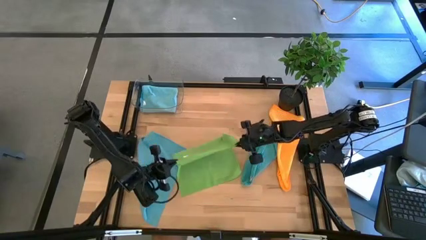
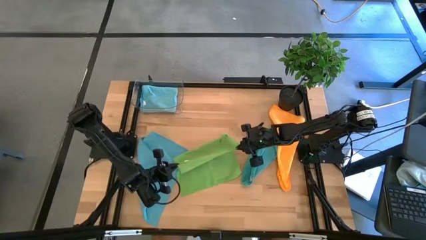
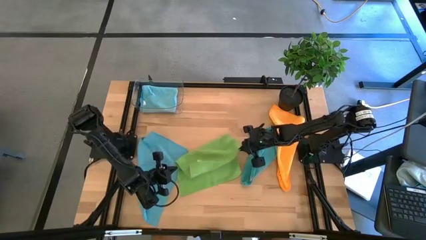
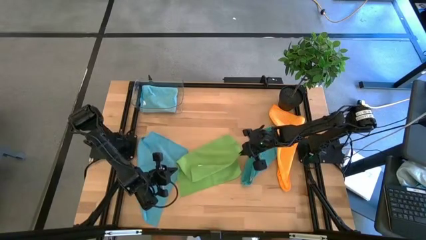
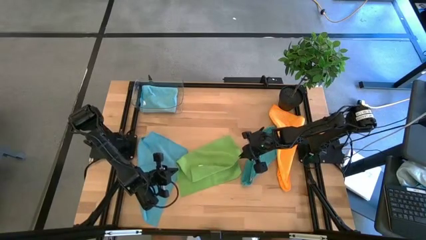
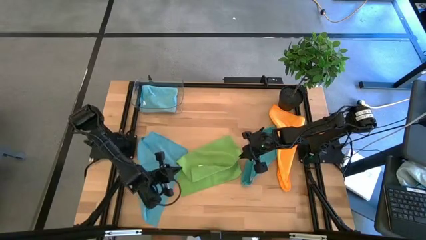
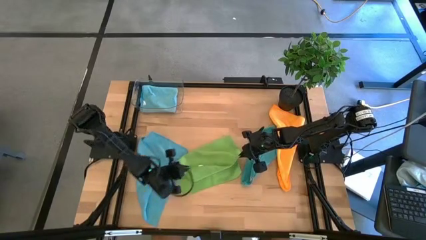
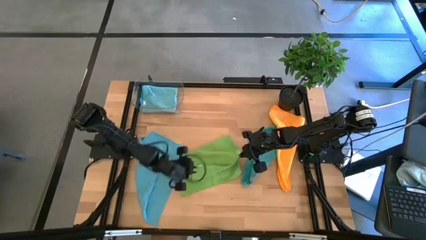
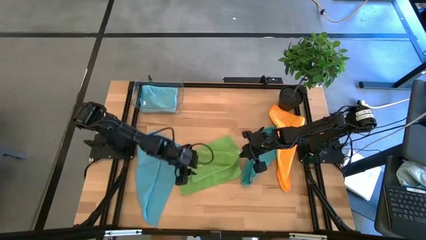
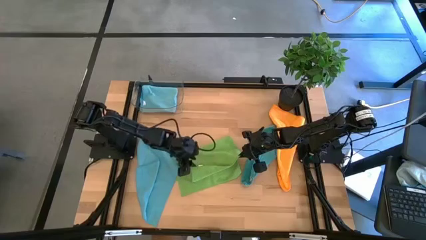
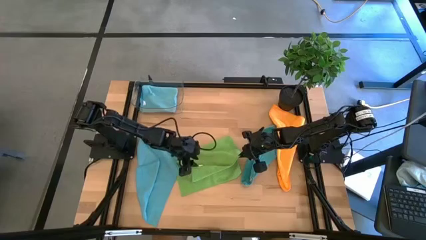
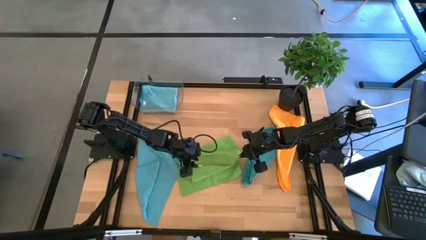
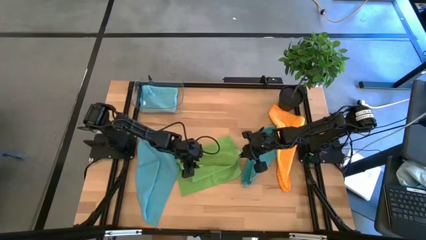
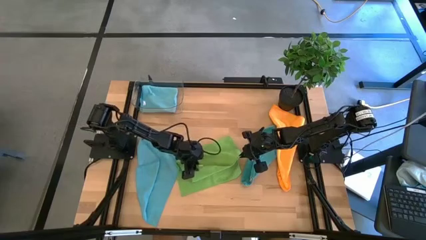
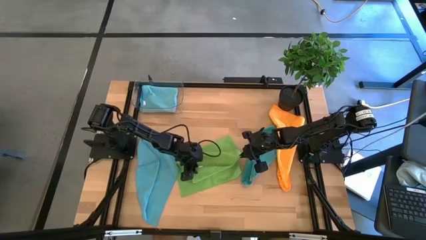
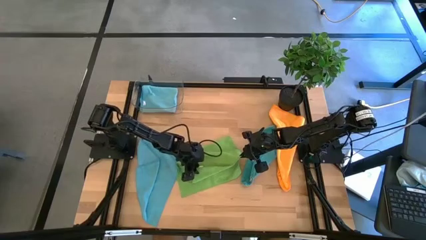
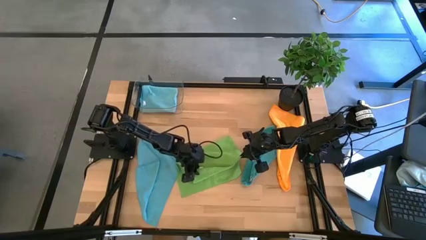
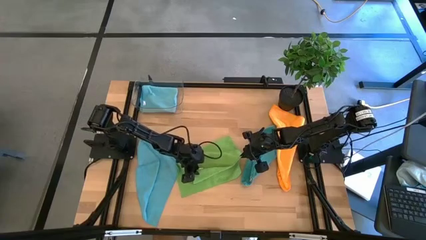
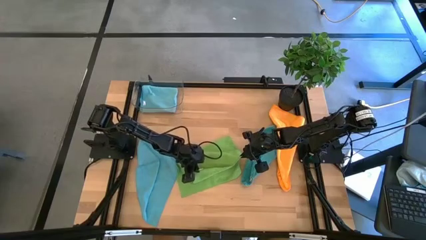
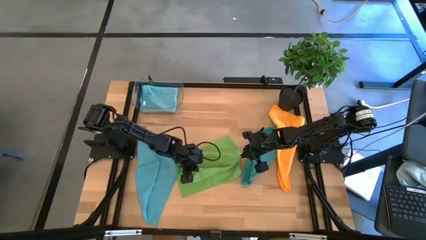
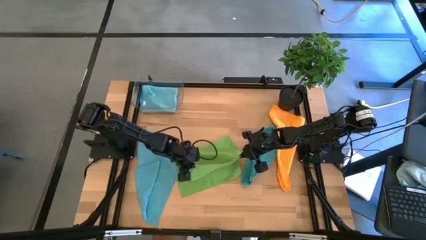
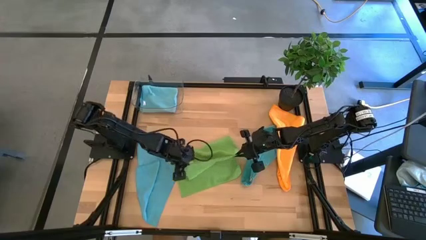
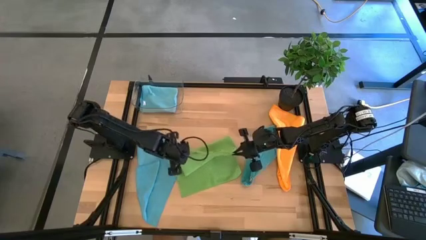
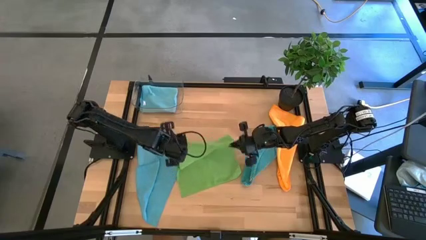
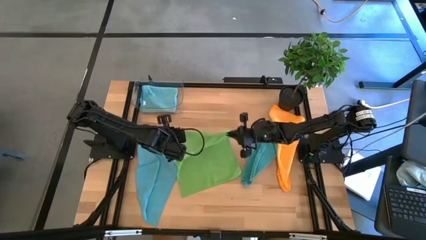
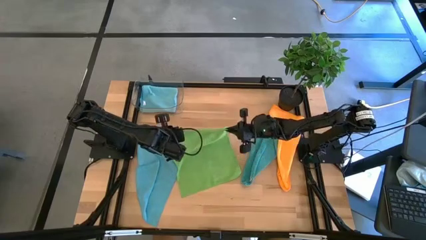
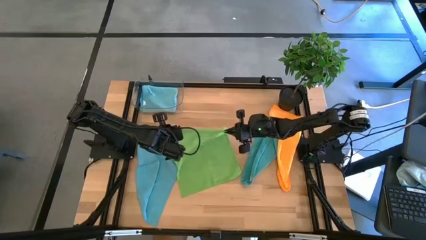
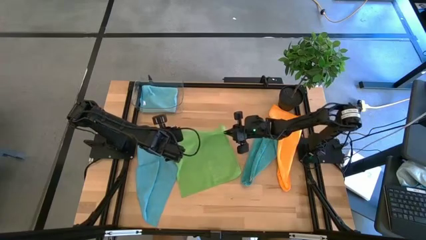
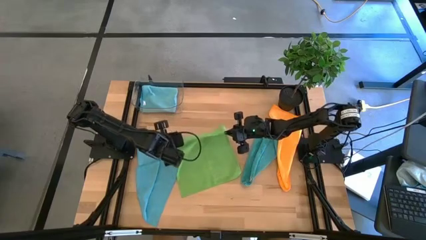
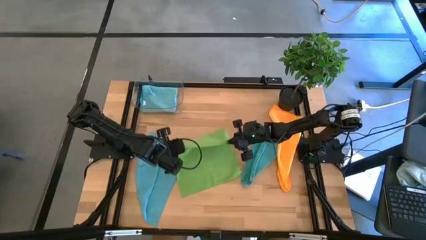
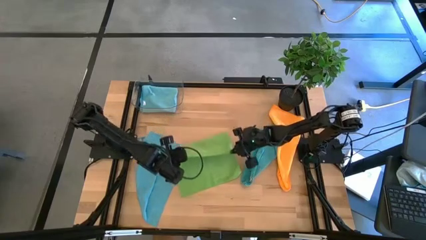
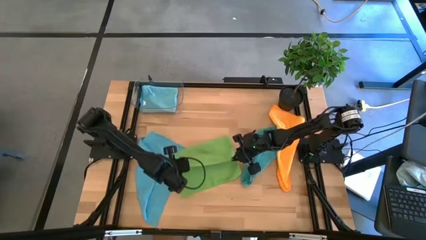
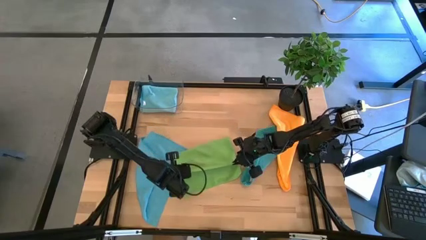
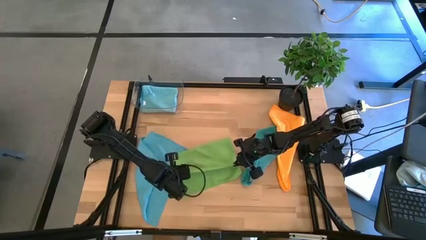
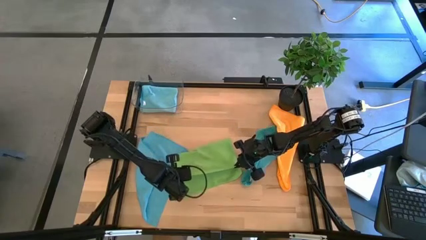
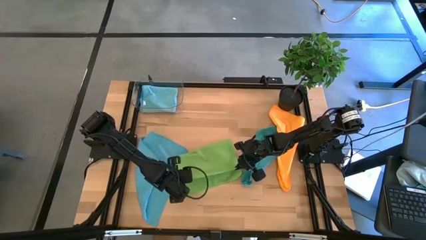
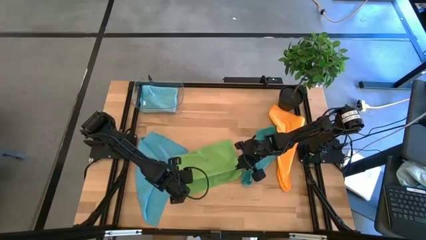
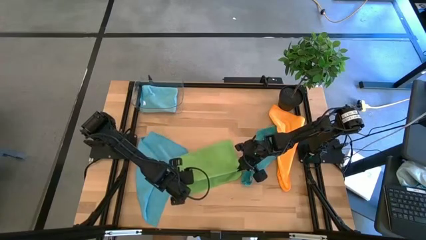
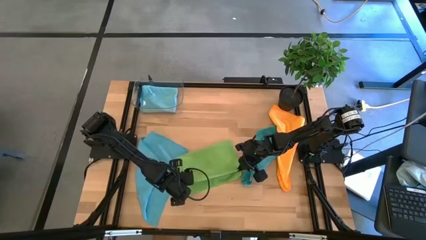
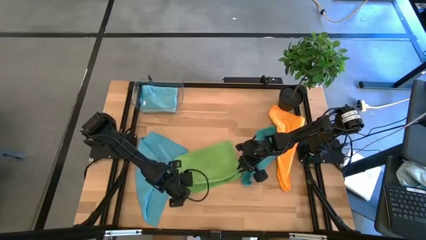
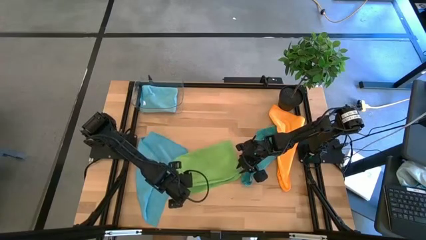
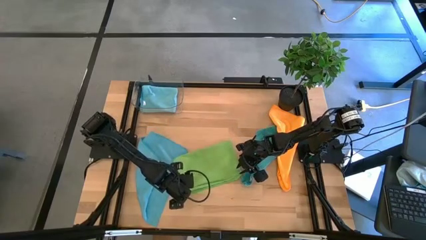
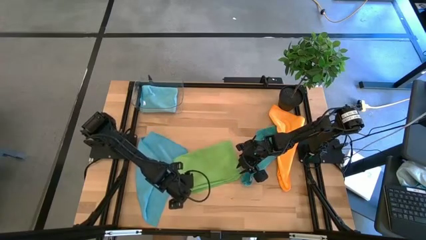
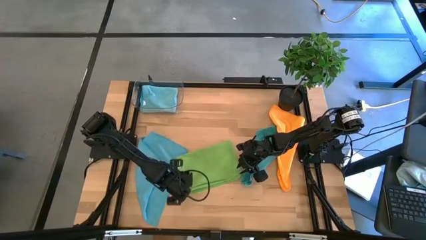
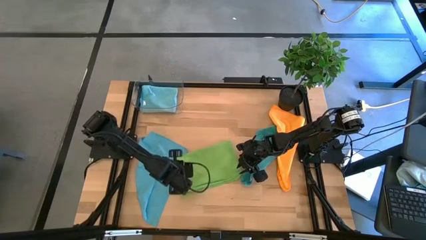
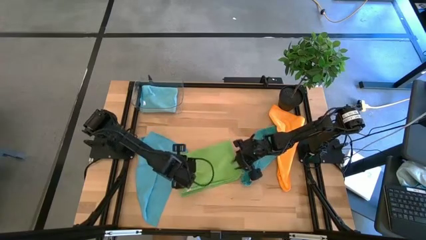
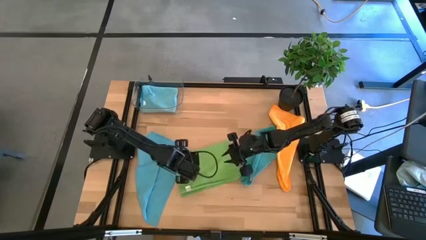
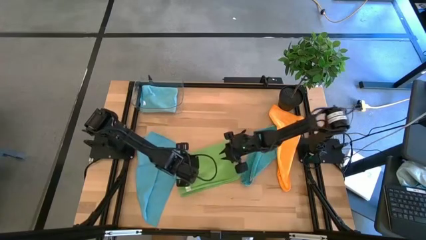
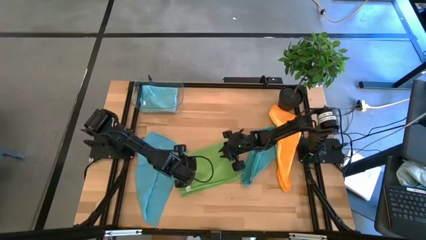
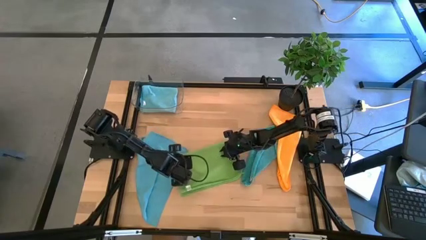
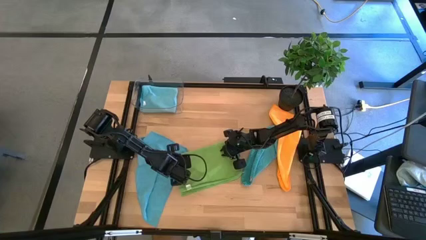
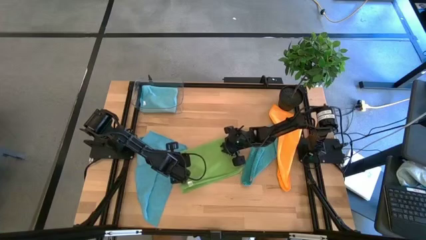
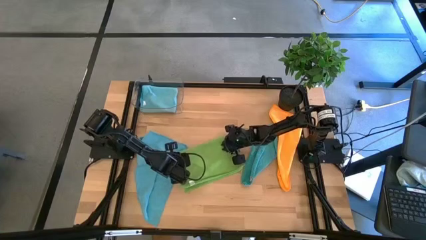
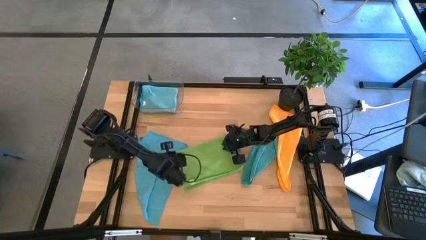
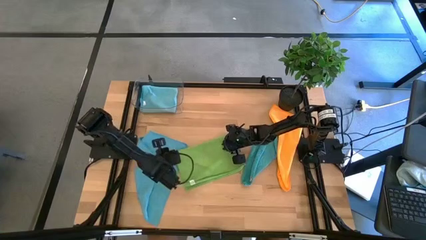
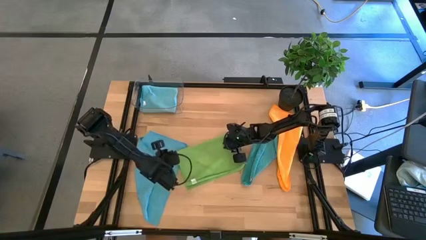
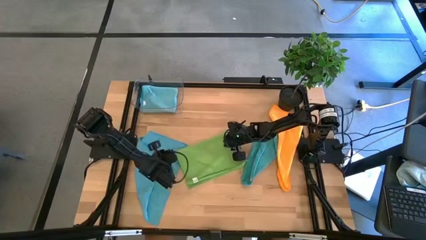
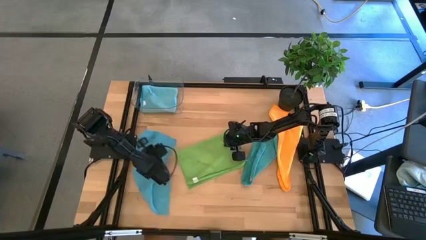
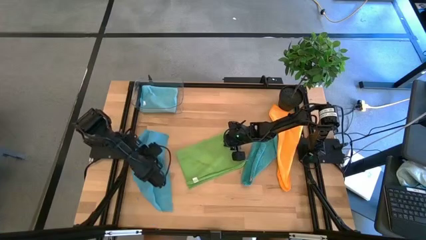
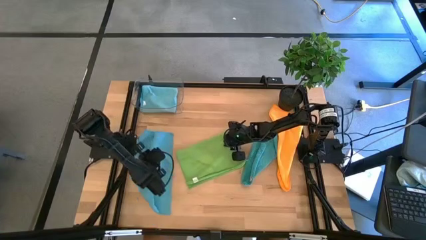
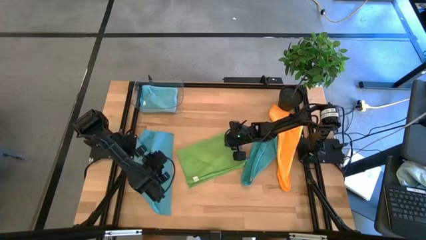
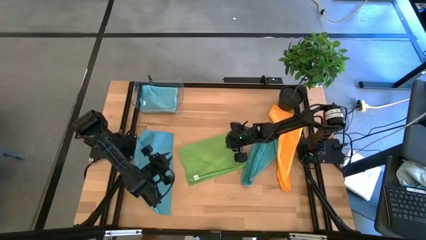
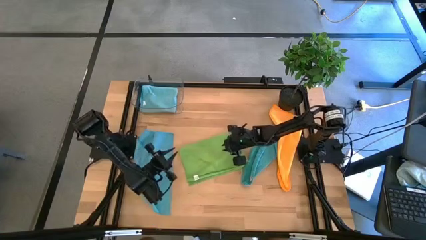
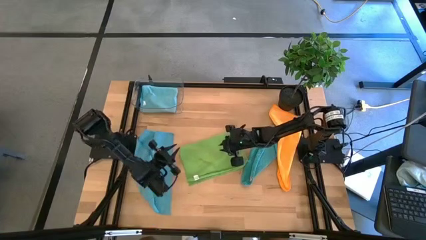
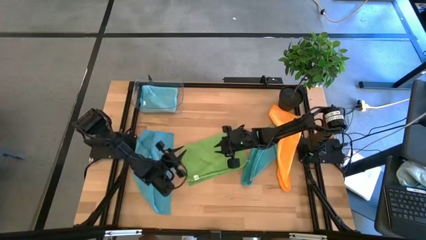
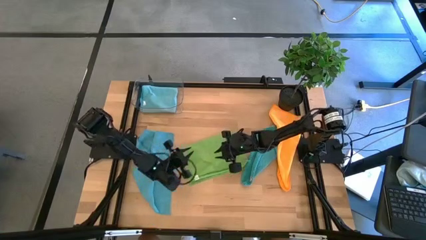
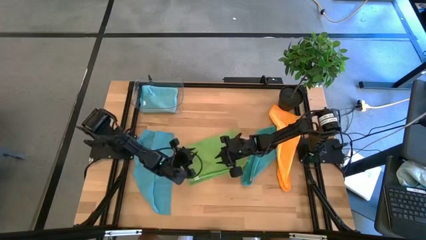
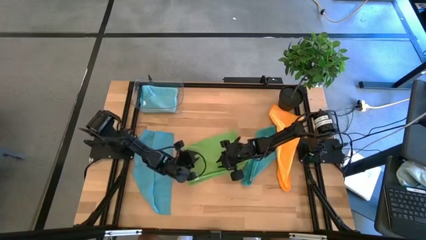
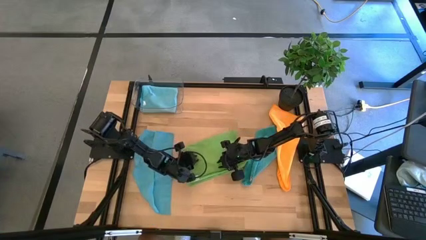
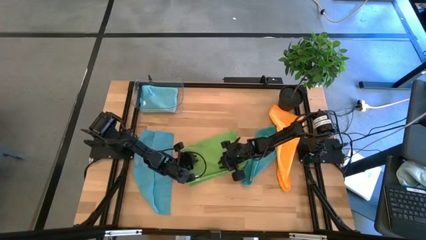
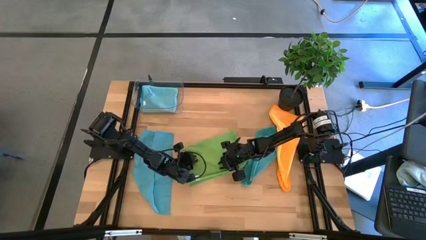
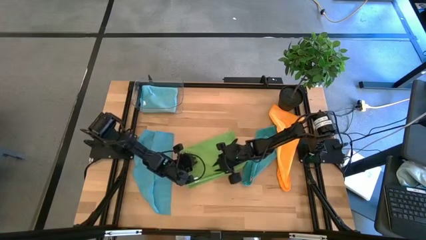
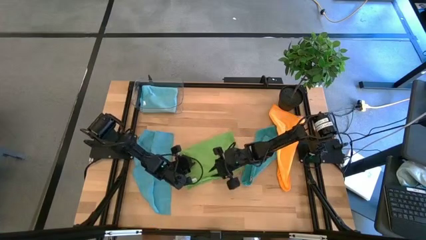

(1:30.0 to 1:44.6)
Task: Fold microfiber towels
Fold the green microfiber cloth
